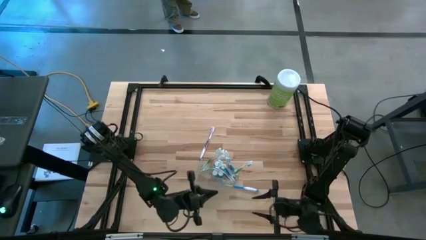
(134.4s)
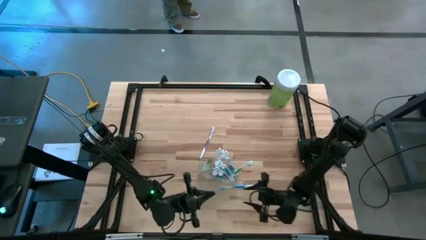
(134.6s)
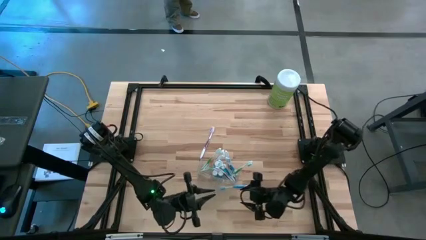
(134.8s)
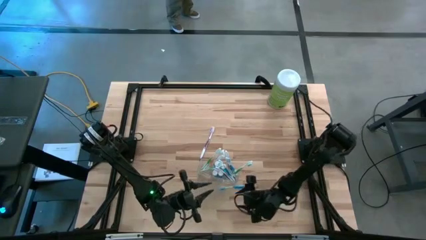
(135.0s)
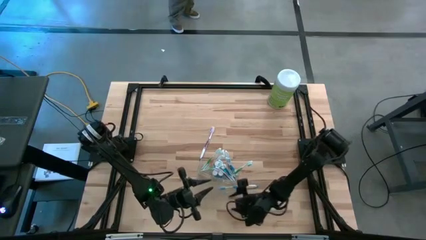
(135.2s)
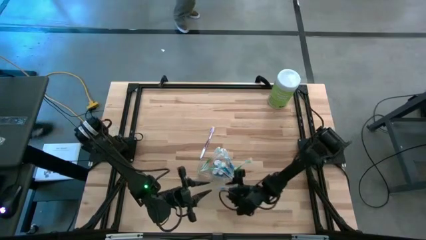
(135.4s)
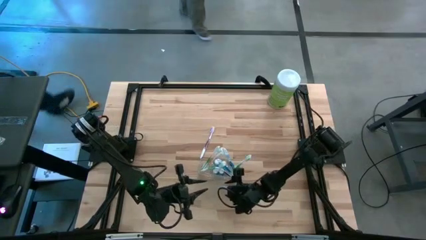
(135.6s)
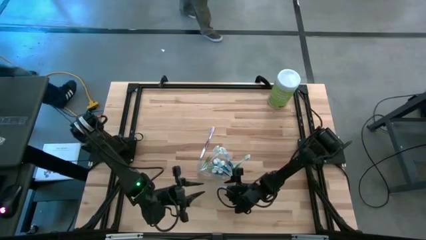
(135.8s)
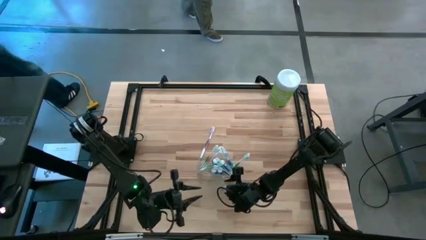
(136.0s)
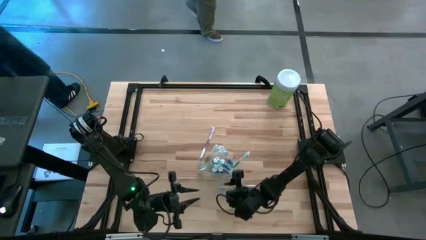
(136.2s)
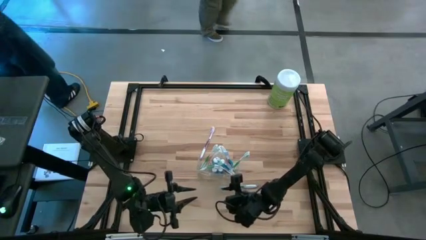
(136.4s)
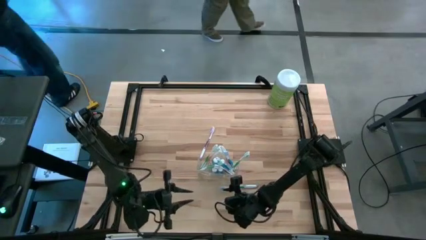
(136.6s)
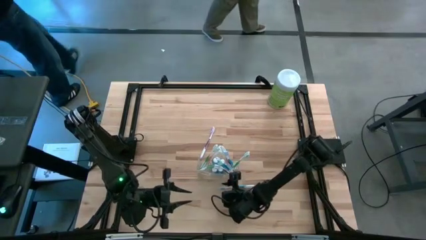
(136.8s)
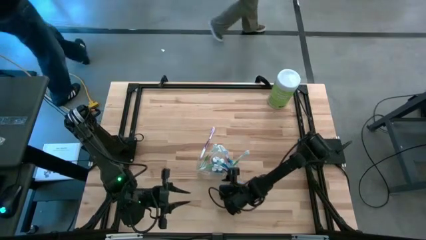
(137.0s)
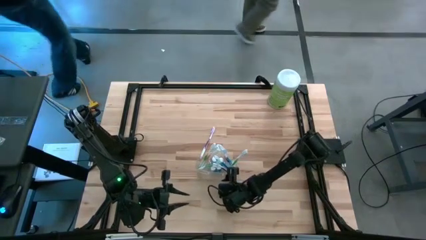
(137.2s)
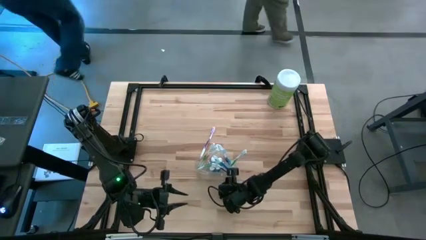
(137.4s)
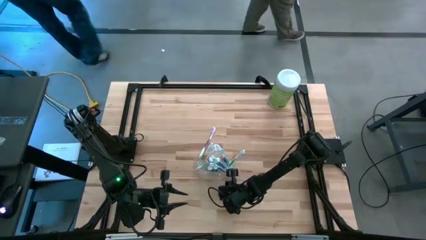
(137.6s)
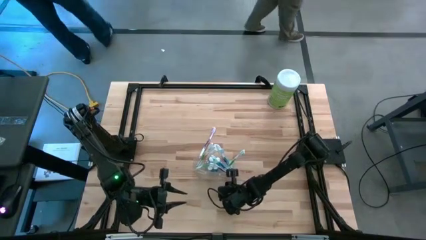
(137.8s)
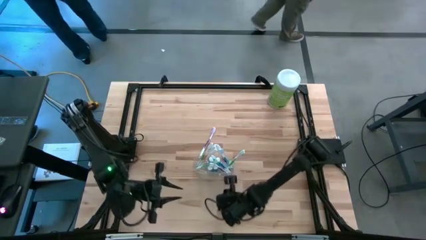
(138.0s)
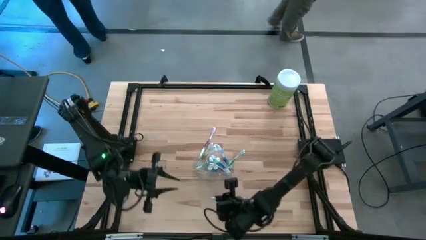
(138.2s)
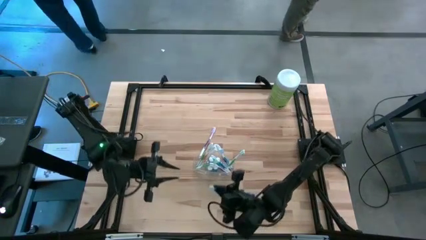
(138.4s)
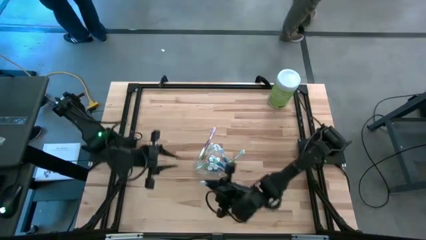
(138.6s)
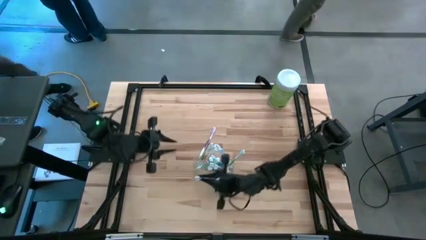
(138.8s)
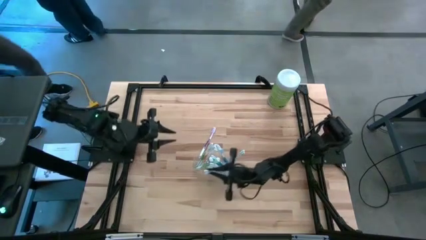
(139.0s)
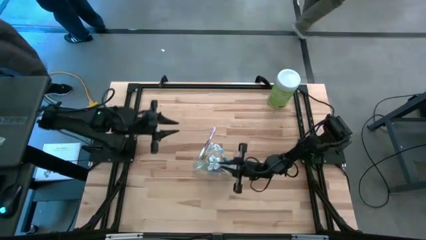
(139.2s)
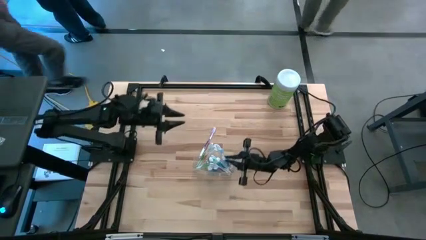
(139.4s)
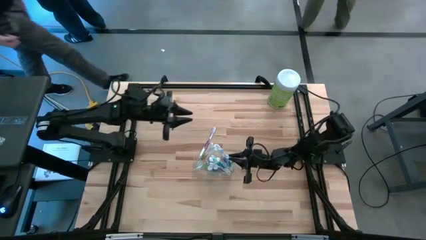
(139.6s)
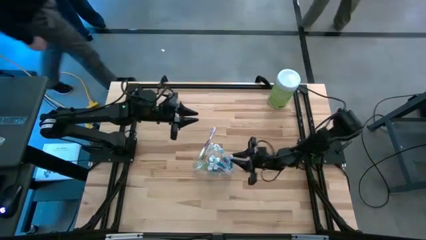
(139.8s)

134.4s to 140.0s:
Task: Pick & Place toothbrushing station
Put the blue toothbrush into the transparent organizer

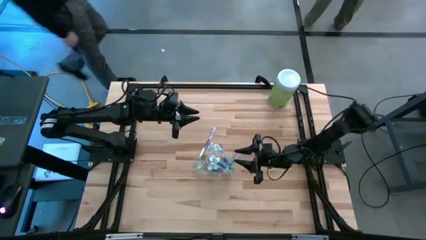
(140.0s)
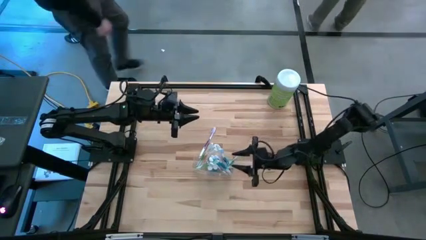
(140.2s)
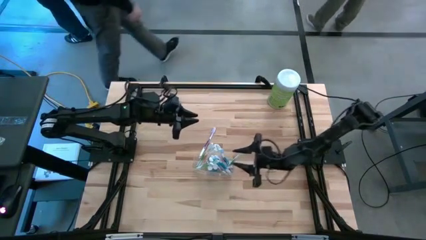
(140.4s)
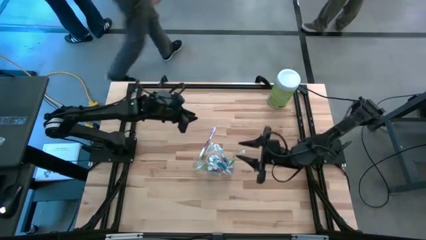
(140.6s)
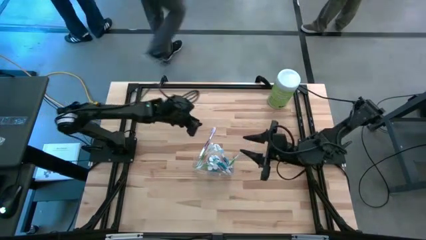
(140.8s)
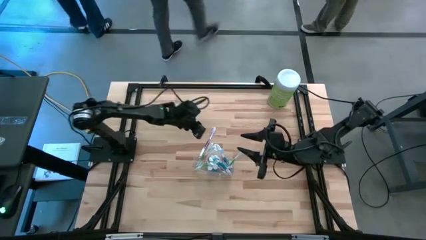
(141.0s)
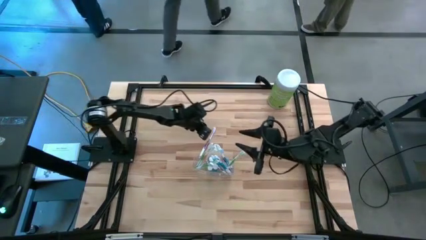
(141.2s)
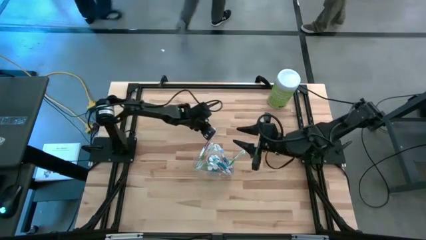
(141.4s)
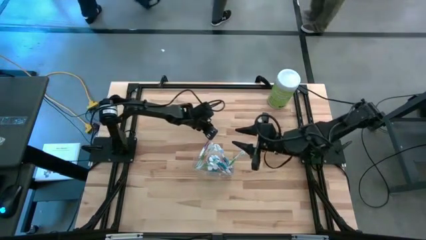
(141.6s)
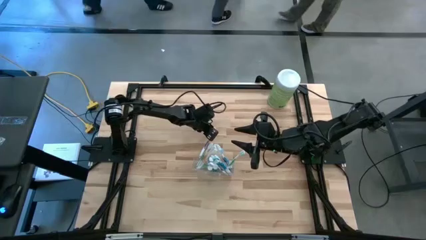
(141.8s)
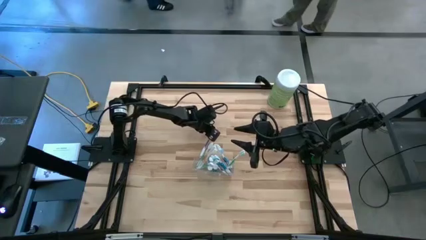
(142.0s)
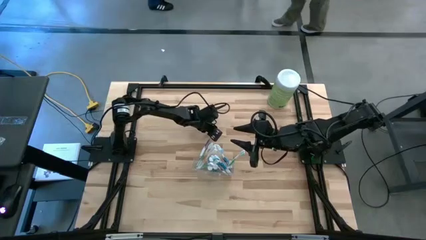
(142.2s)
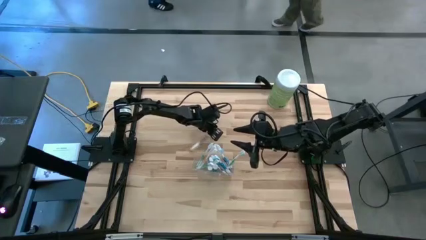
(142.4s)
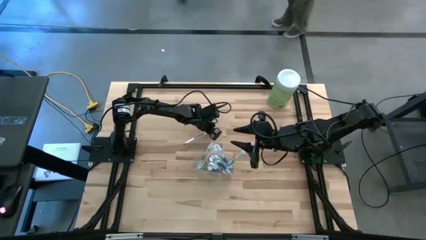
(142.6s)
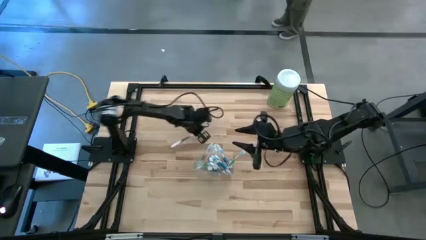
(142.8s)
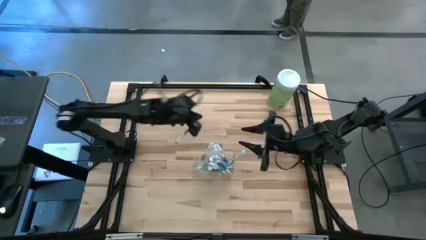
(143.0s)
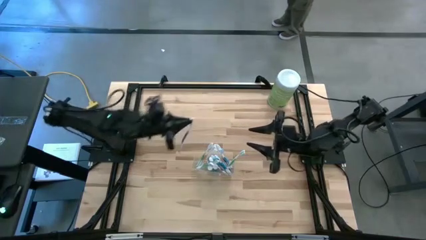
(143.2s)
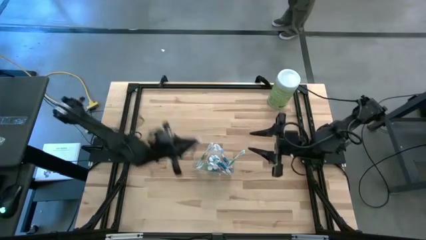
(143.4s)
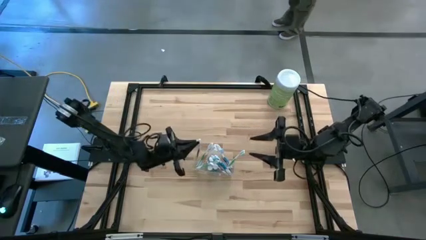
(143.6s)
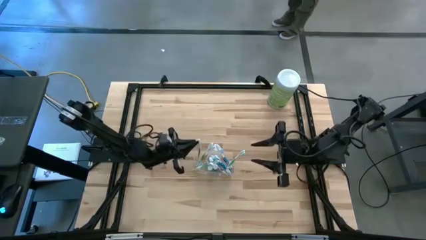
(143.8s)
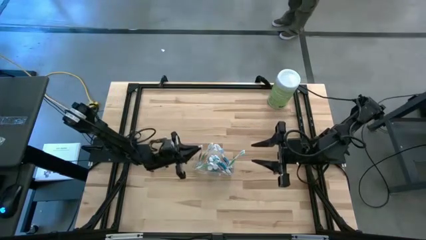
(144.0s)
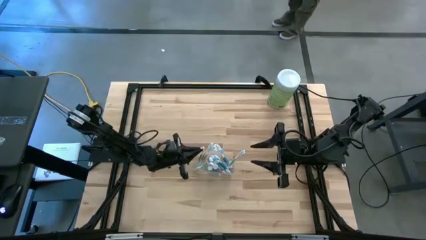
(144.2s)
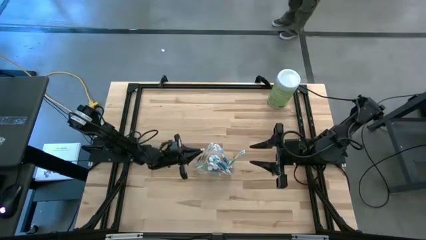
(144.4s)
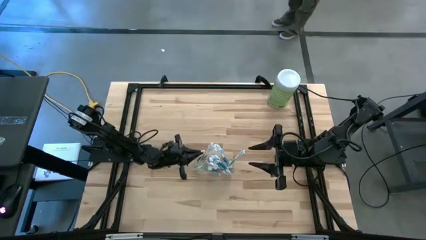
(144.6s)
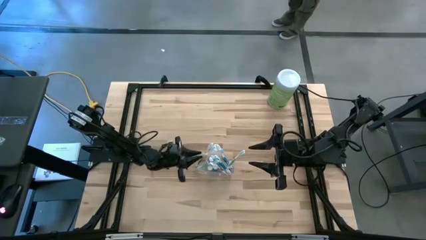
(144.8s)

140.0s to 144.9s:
Put the purple toothbrush into the transparent organizer

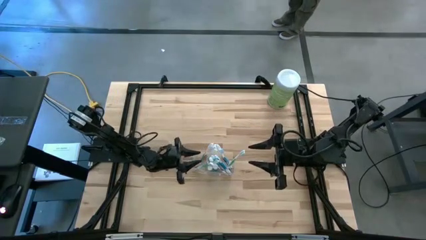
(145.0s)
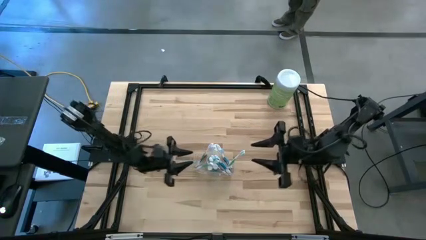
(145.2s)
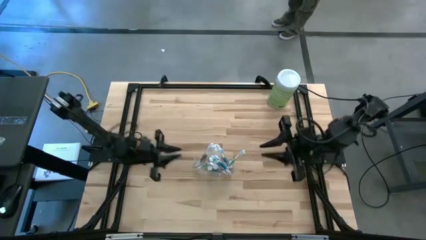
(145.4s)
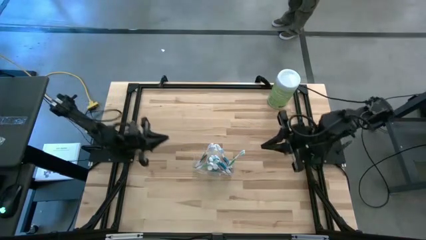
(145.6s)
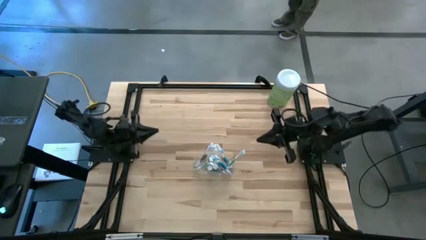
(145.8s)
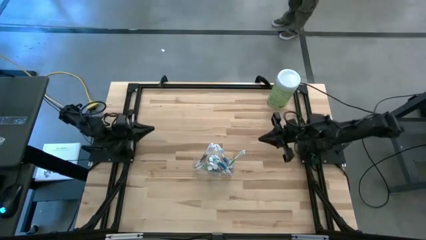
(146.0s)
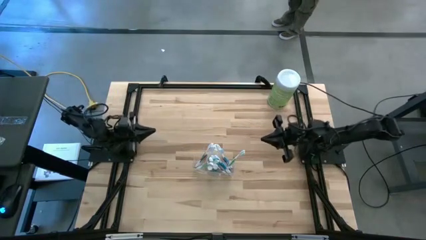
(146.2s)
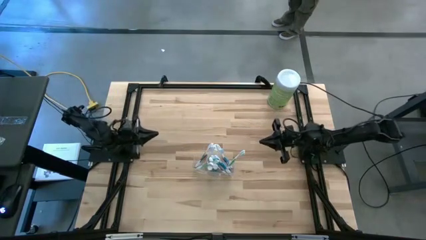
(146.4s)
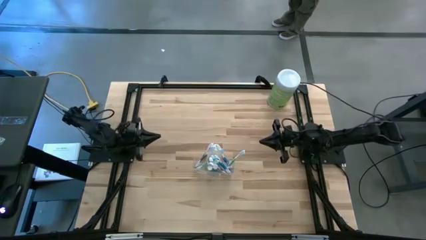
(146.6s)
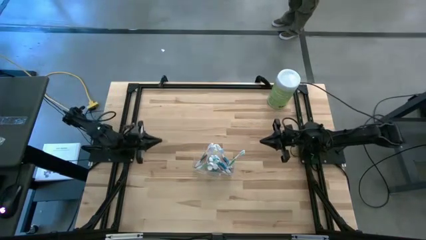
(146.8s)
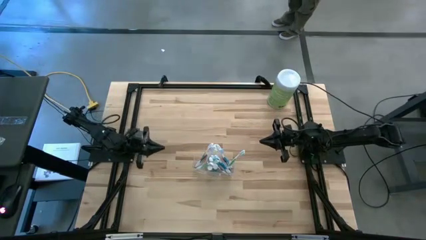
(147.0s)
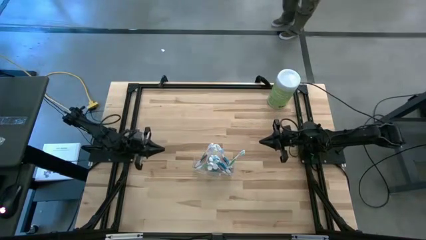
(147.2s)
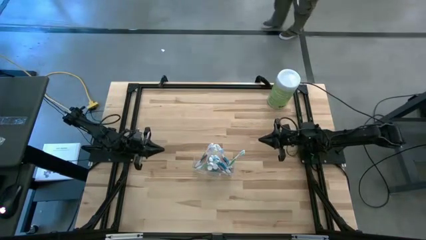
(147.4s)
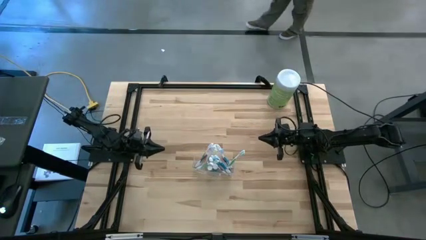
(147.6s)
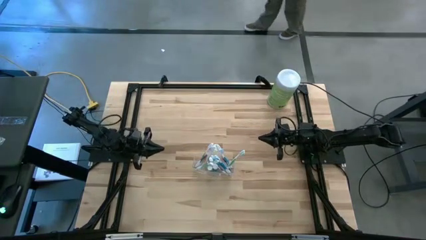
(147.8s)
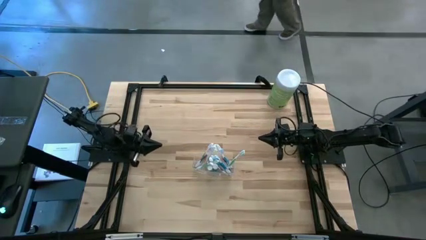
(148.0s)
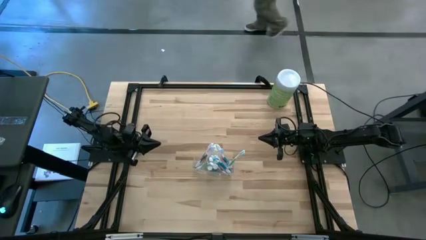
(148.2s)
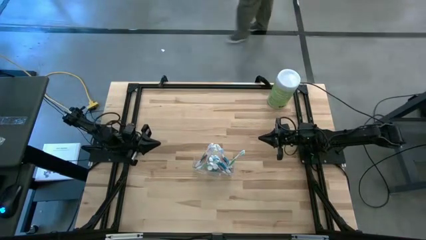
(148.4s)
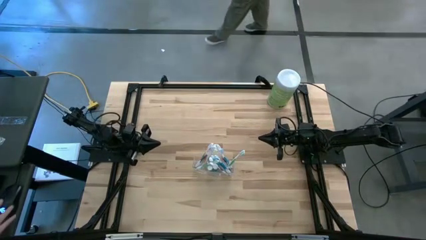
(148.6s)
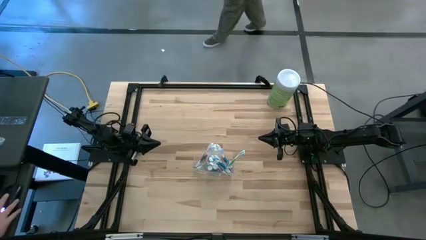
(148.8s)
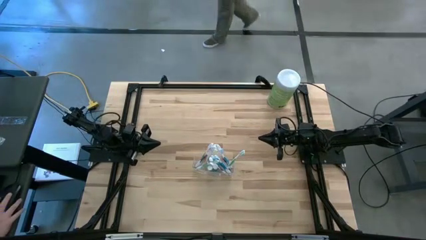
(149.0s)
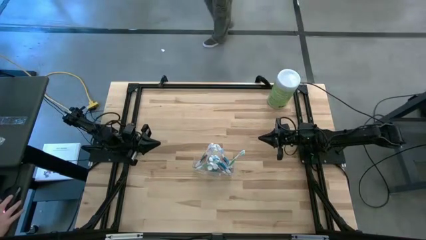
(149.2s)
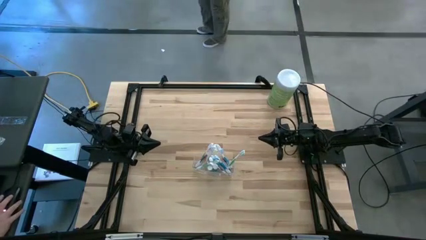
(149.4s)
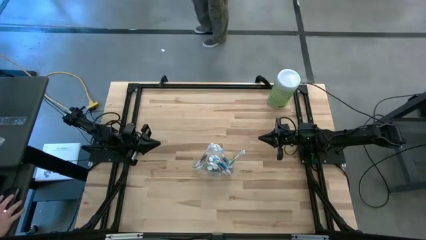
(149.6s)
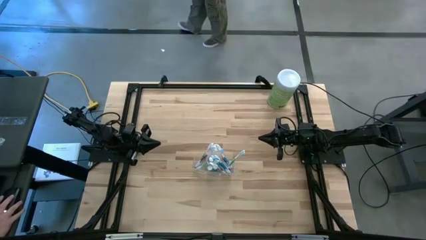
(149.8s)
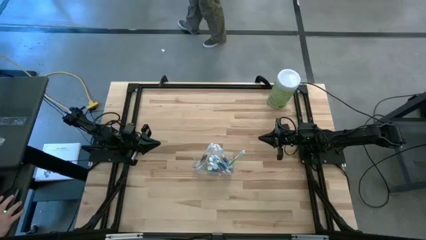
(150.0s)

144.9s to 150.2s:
Return to Home Position

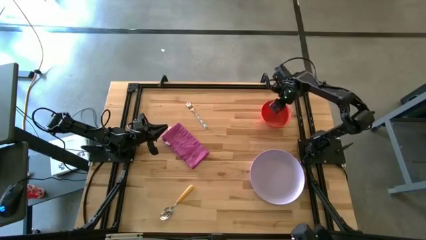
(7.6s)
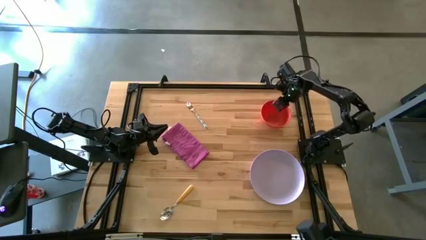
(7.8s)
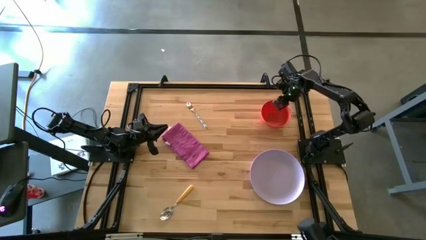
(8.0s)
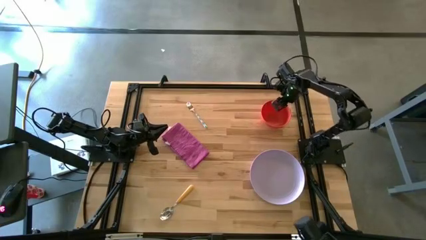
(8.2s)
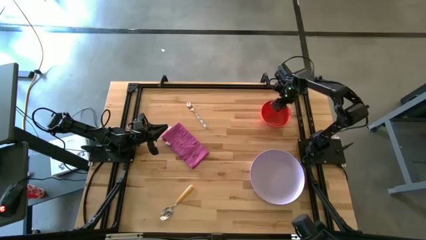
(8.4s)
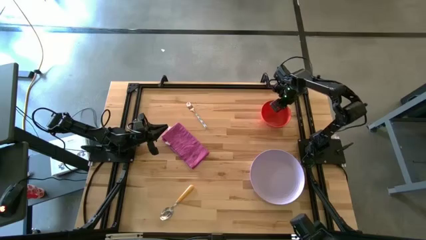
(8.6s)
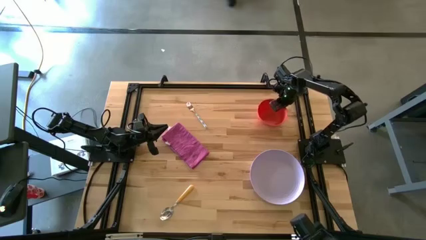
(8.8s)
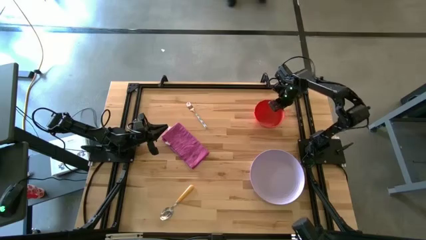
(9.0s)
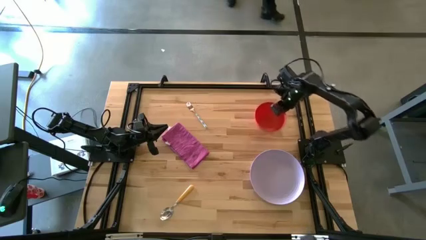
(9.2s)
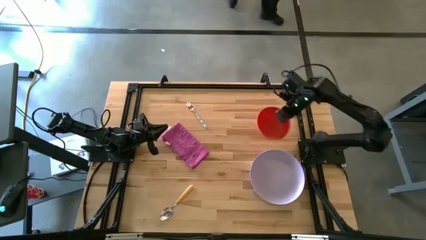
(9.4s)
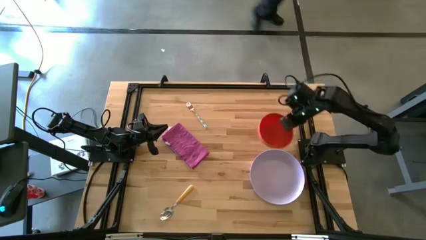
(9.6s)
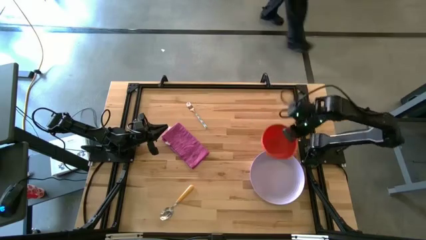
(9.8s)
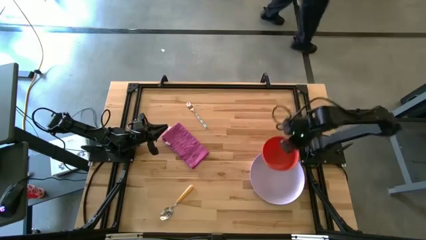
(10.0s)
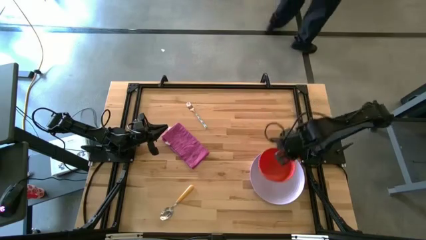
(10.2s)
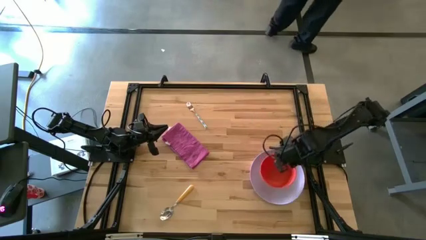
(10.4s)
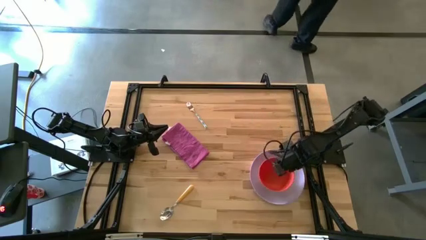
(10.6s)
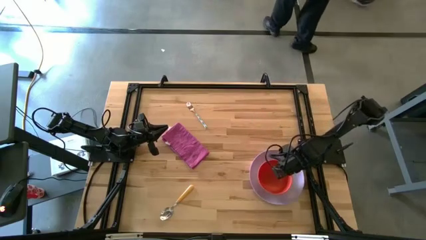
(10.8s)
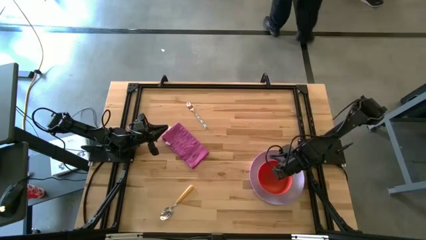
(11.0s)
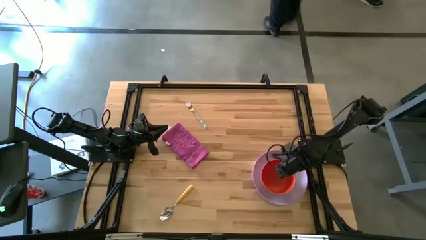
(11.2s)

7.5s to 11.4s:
Task: Set table place
Put the orange bowl on the purple plate
